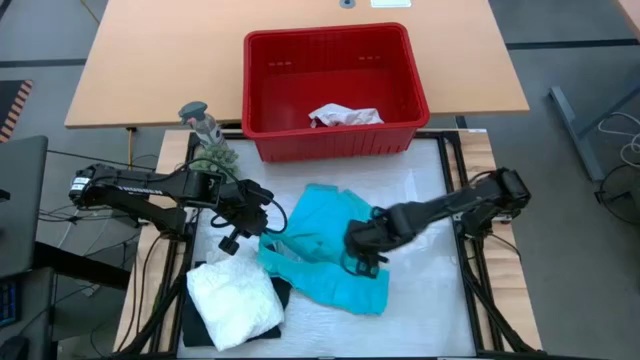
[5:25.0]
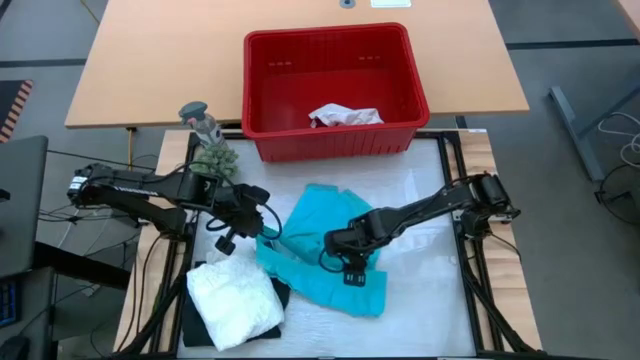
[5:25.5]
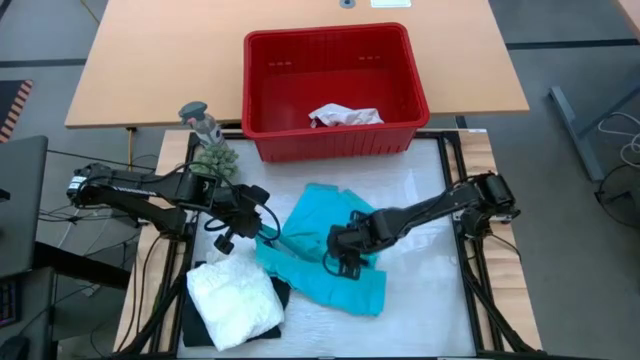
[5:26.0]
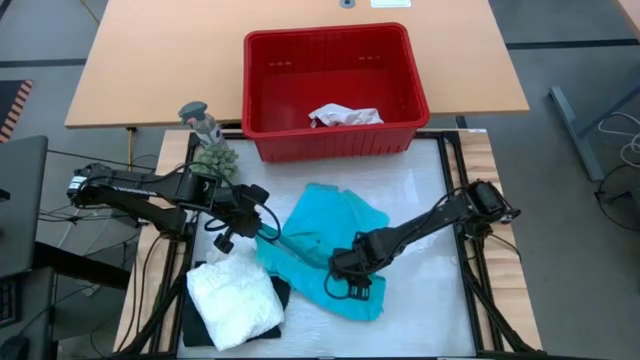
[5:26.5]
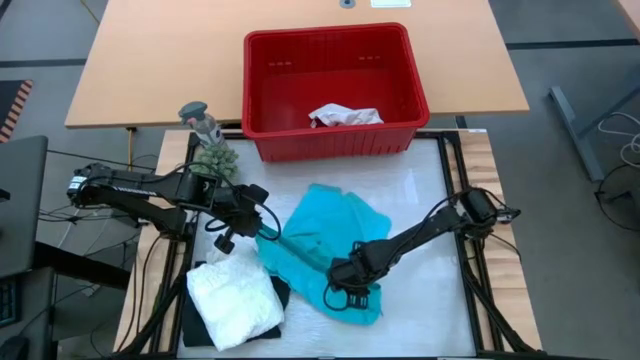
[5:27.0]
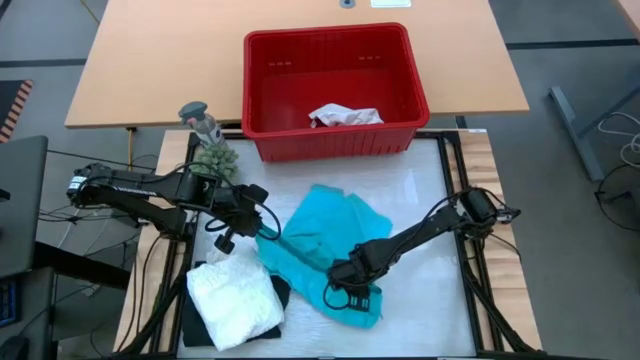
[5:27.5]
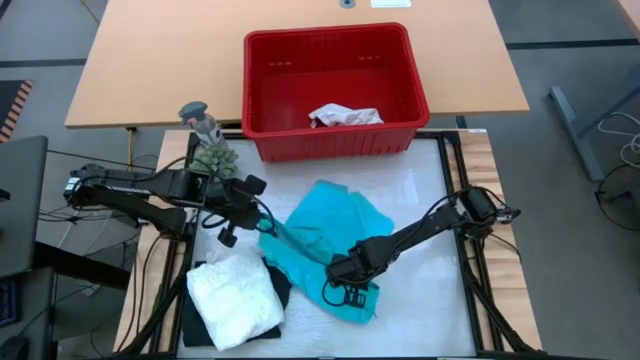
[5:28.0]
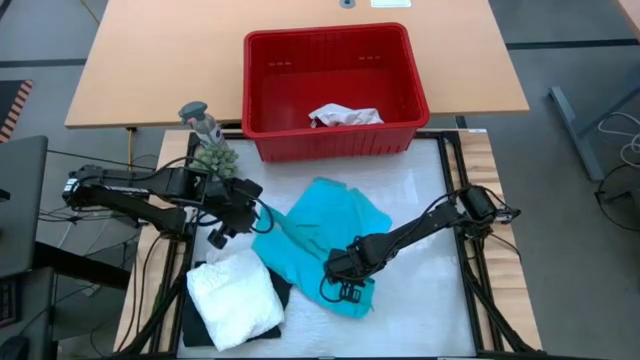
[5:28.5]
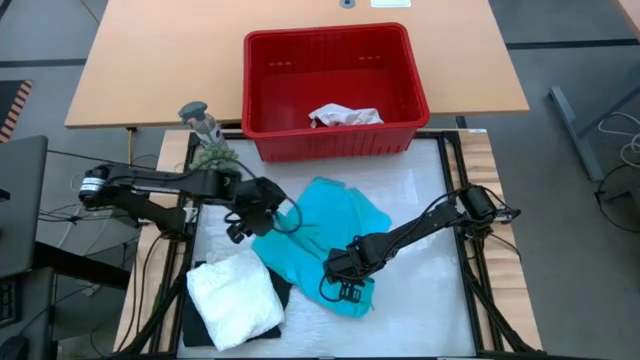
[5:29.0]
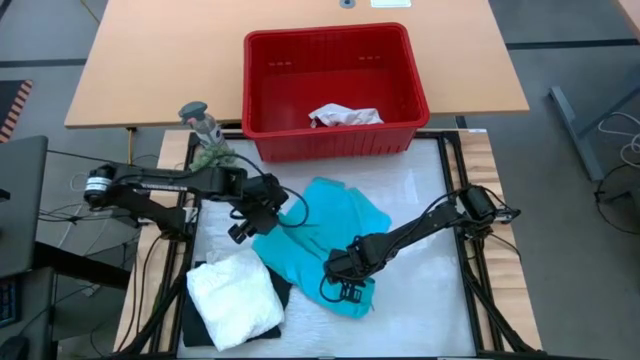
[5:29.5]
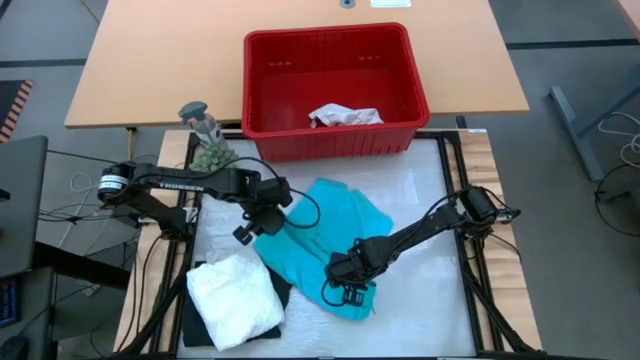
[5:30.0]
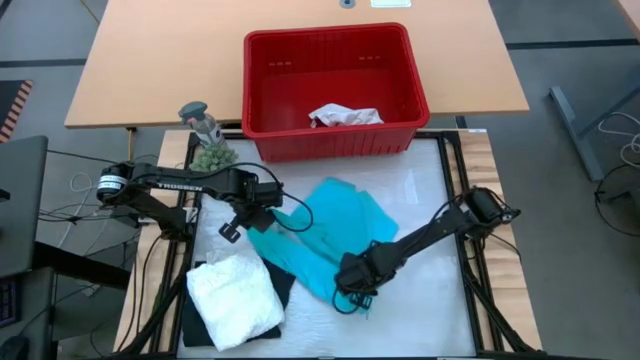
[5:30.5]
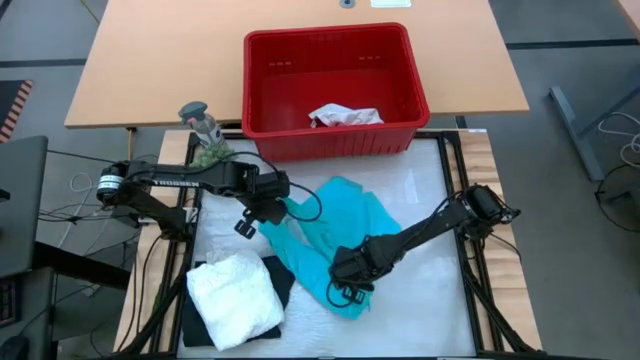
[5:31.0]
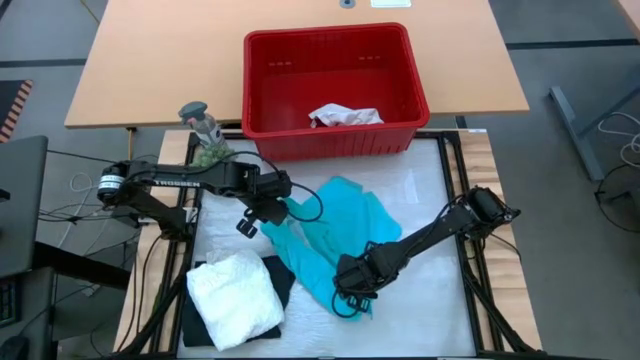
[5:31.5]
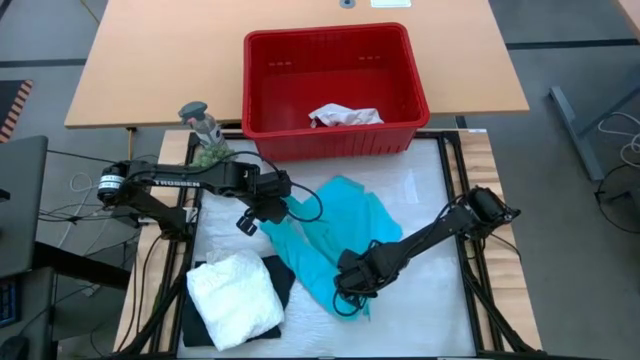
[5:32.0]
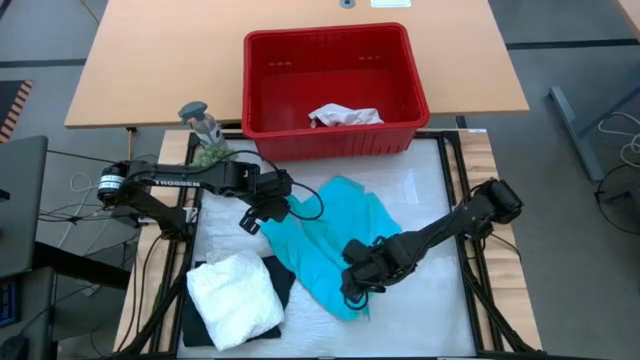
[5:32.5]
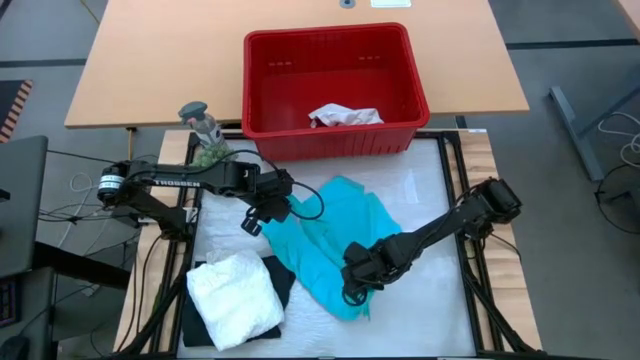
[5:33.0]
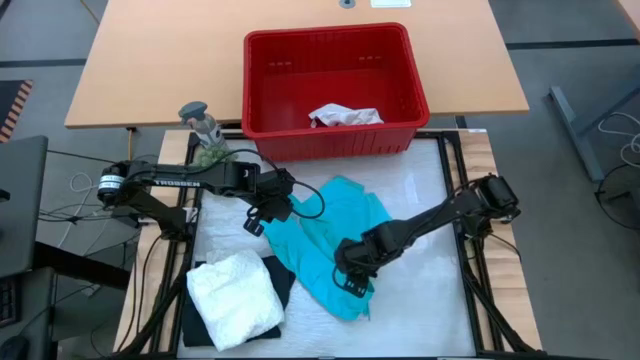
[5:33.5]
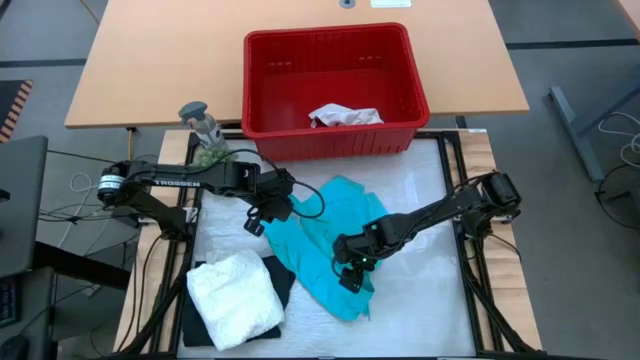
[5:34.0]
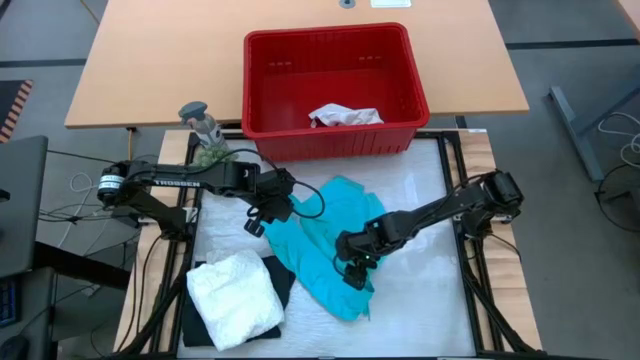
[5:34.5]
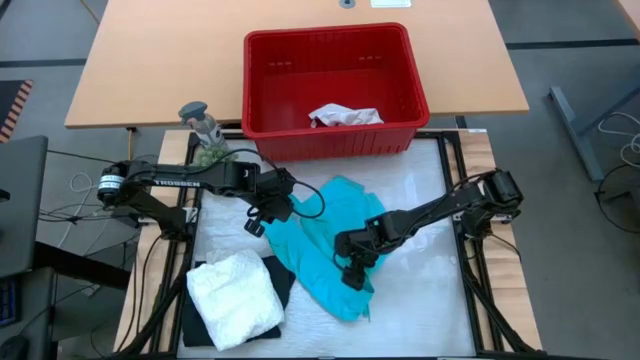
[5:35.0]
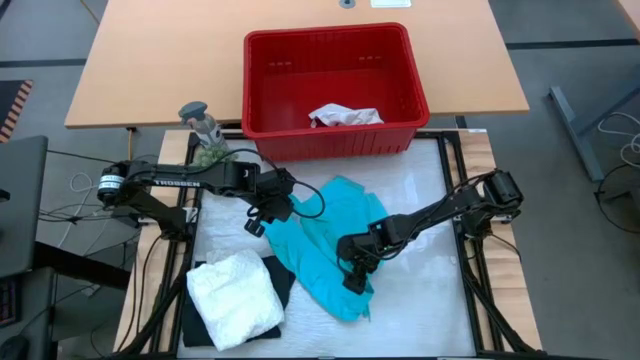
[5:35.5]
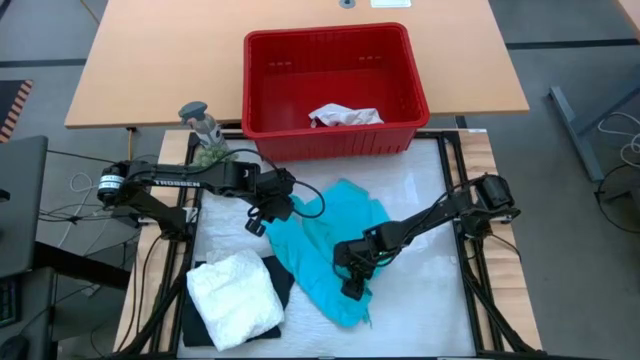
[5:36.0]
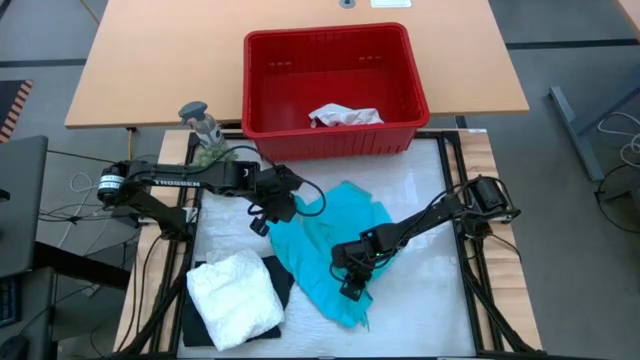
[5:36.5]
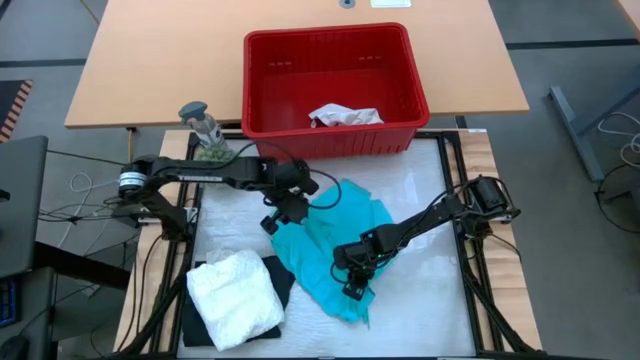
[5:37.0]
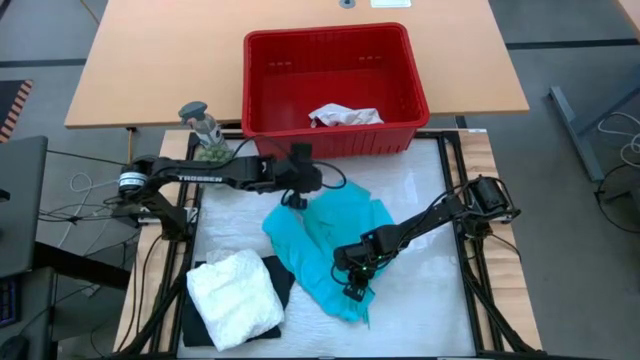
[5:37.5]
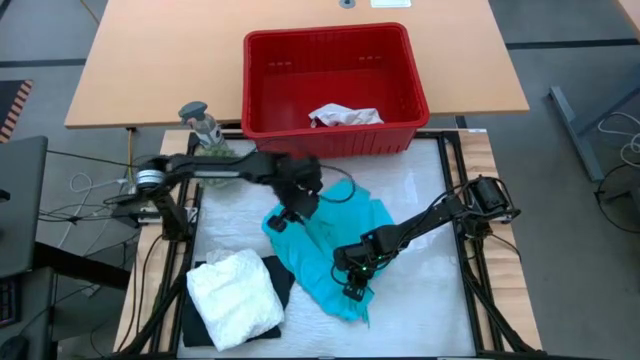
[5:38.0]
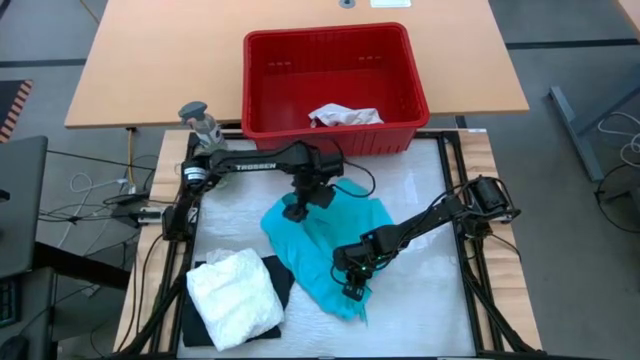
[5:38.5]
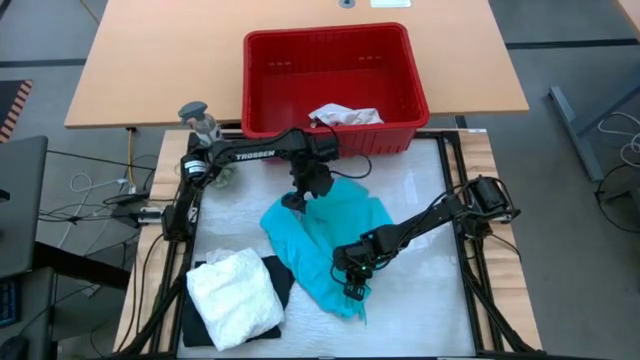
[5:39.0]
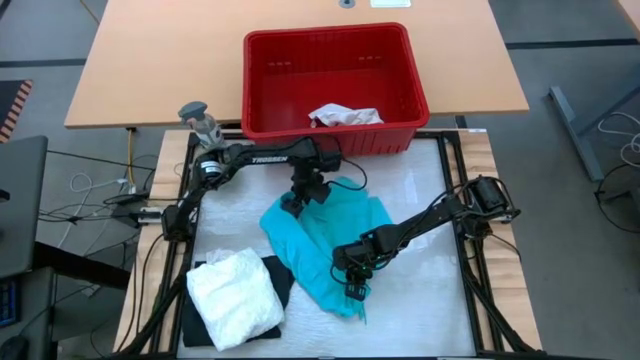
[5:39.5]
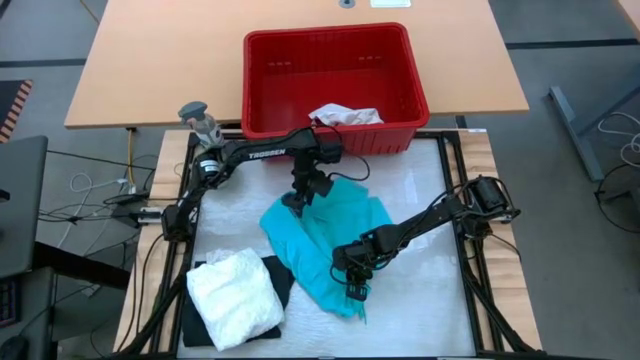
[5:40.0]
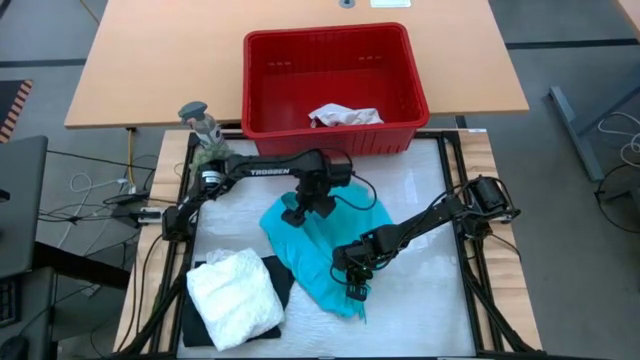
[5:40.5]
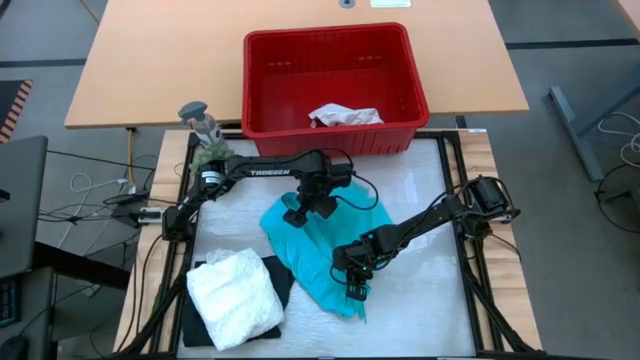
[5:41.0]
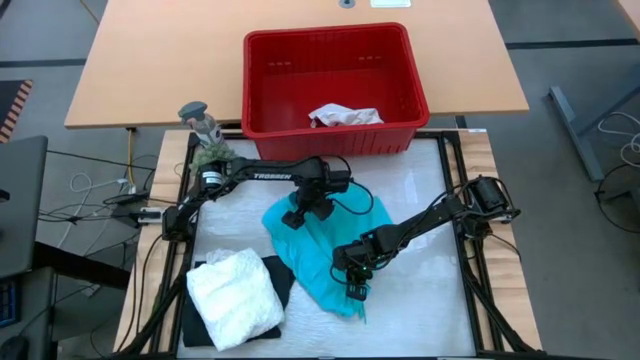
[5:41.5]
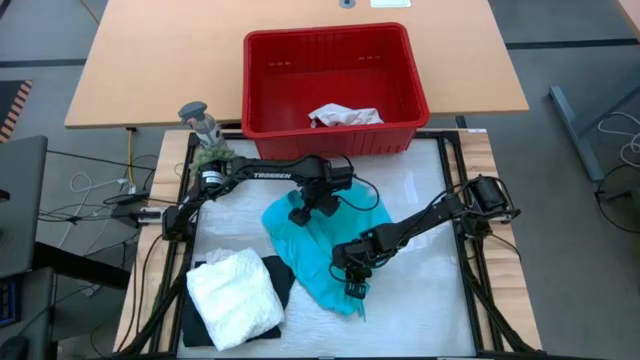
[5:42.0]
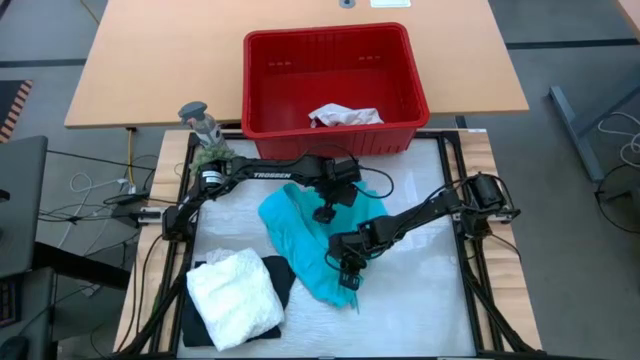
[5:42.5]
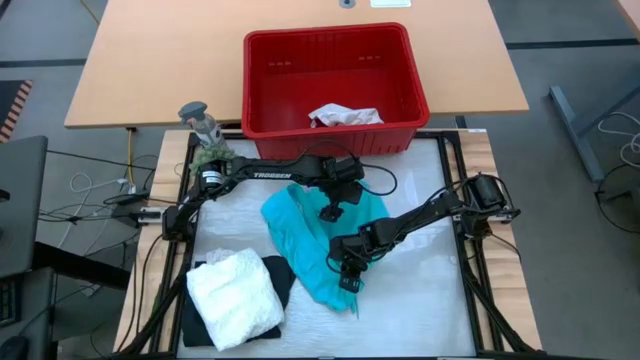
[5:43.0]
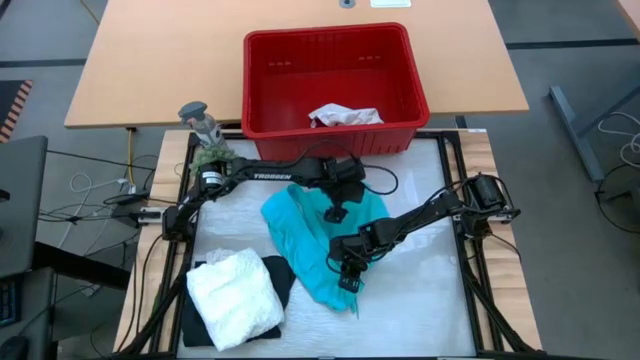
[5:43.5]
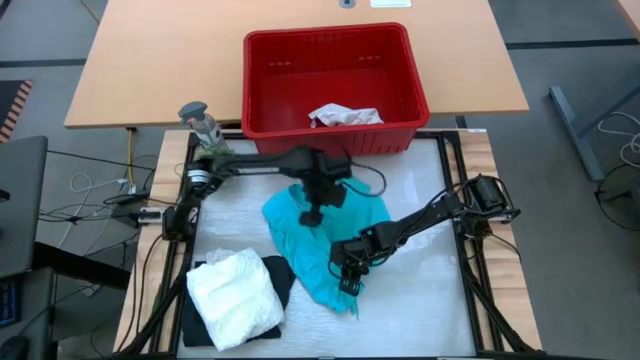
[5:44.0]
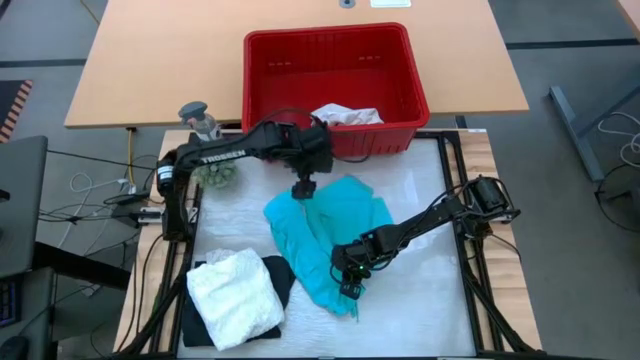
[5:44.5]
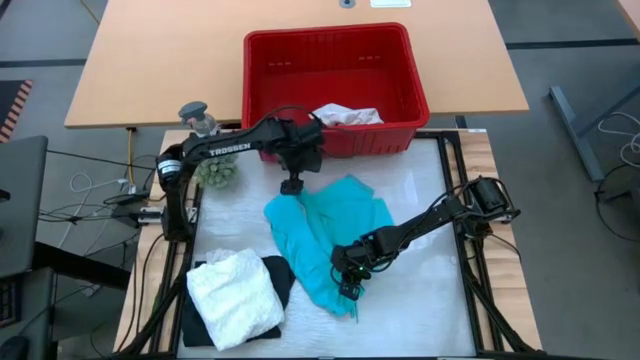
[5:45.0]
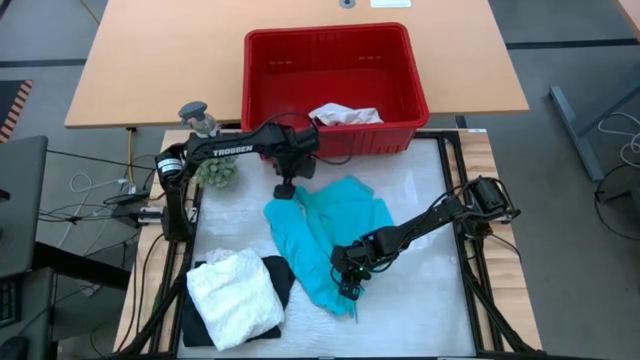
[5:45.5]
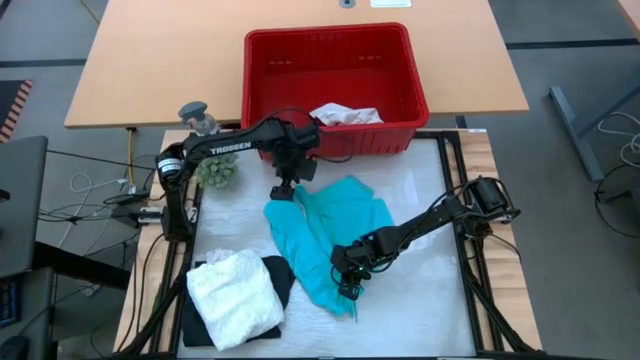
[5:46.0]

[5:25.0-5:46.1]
Task: Fold Laundry from Bin
Fold the blue shorts
